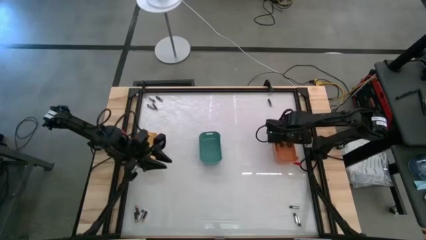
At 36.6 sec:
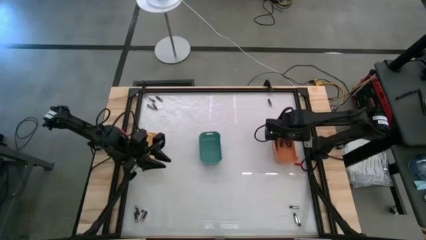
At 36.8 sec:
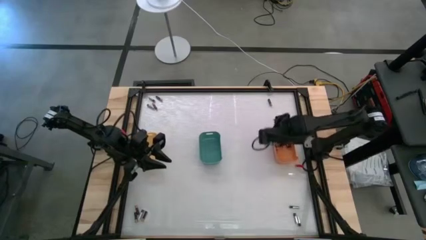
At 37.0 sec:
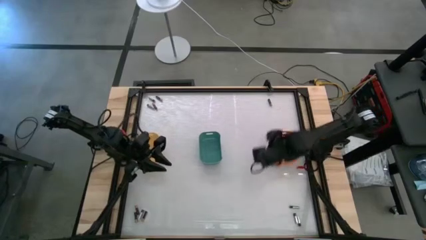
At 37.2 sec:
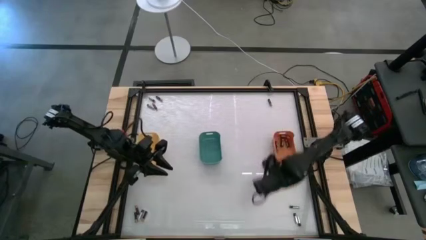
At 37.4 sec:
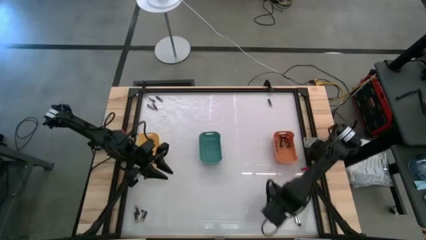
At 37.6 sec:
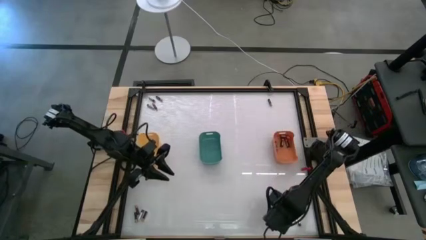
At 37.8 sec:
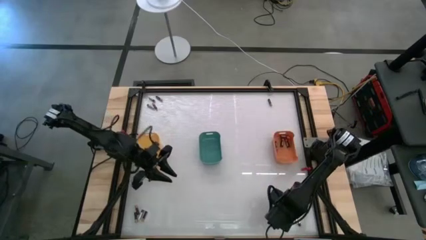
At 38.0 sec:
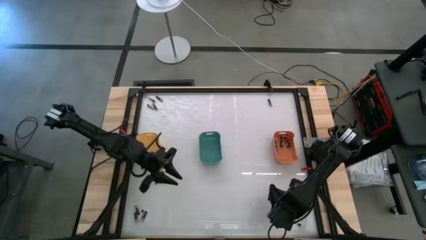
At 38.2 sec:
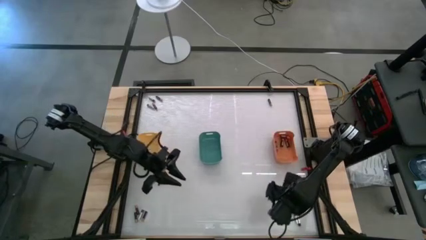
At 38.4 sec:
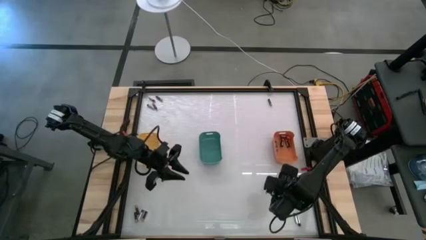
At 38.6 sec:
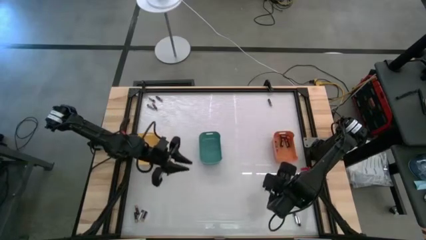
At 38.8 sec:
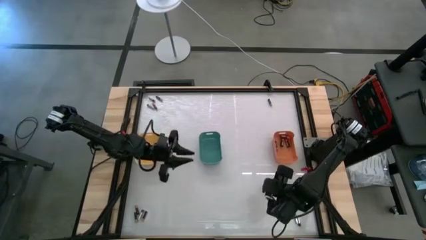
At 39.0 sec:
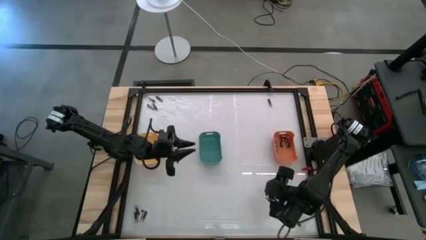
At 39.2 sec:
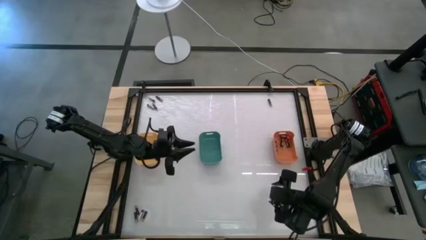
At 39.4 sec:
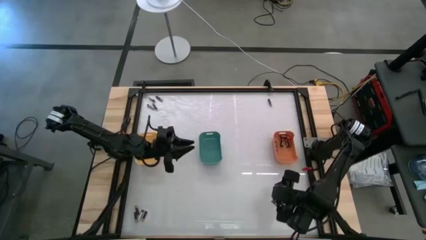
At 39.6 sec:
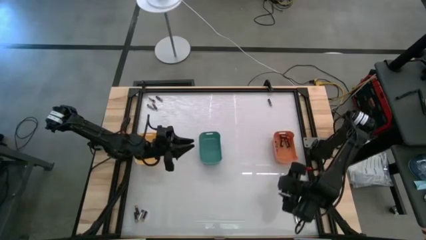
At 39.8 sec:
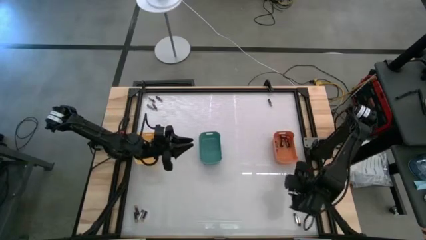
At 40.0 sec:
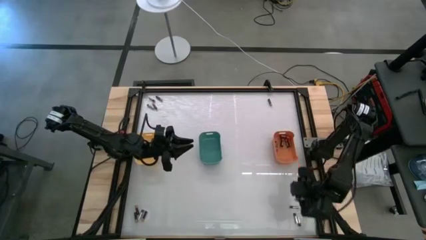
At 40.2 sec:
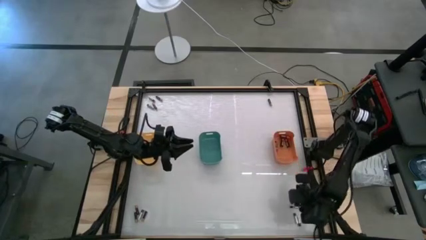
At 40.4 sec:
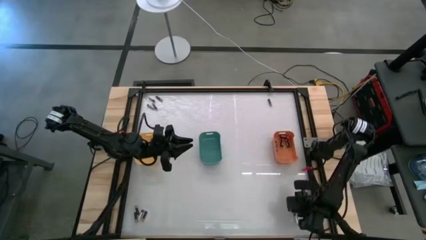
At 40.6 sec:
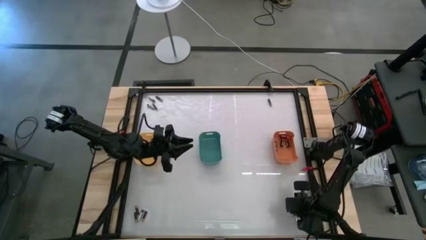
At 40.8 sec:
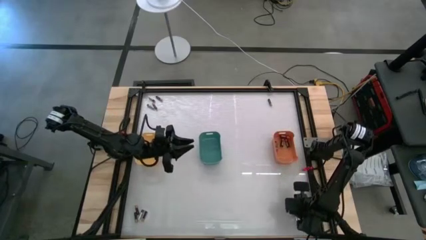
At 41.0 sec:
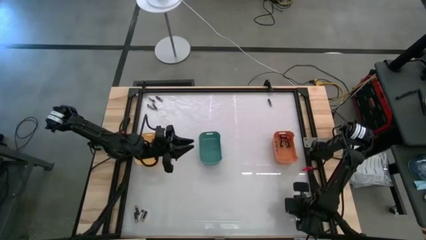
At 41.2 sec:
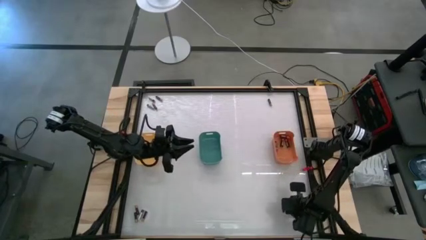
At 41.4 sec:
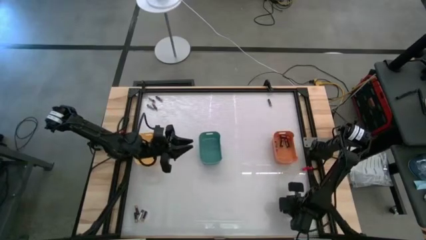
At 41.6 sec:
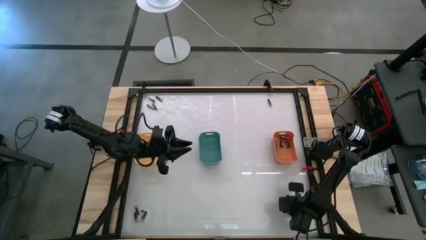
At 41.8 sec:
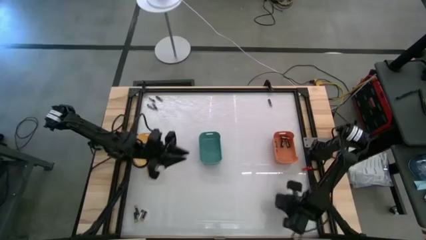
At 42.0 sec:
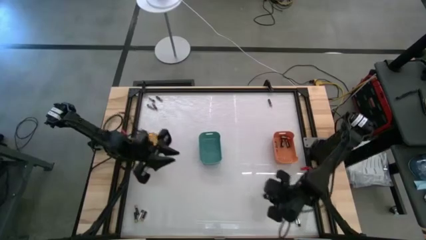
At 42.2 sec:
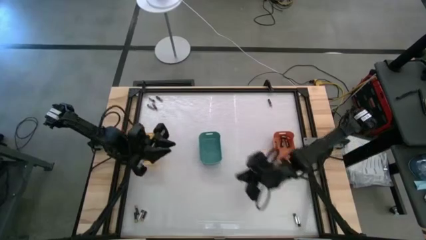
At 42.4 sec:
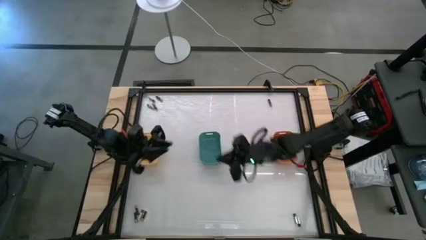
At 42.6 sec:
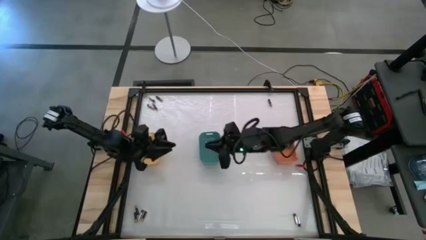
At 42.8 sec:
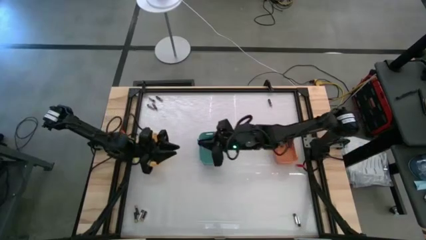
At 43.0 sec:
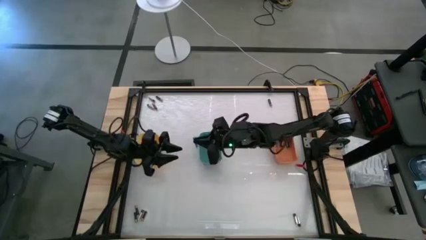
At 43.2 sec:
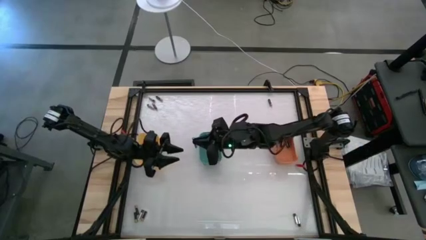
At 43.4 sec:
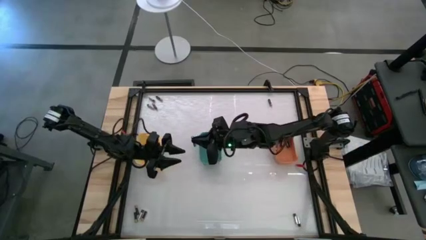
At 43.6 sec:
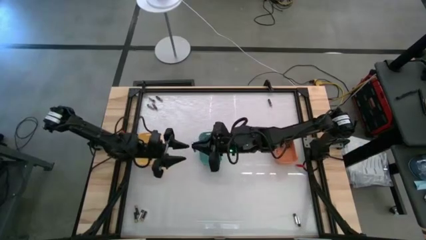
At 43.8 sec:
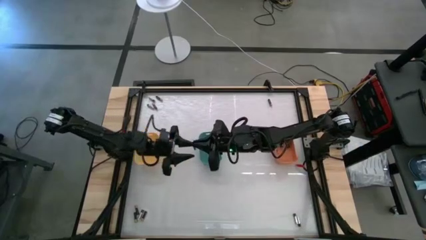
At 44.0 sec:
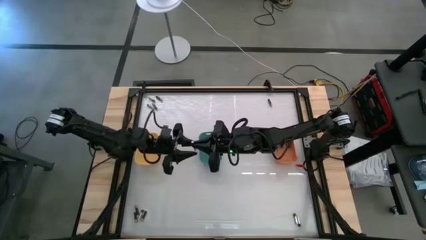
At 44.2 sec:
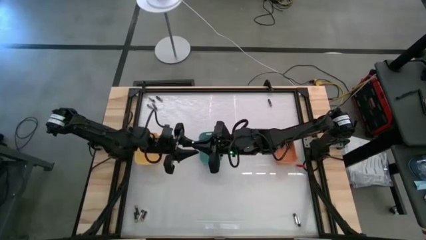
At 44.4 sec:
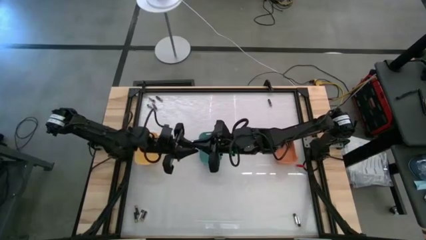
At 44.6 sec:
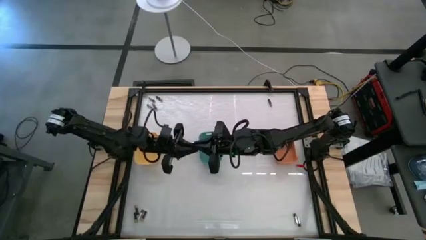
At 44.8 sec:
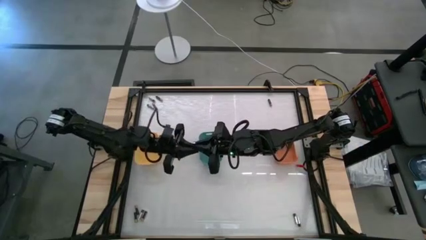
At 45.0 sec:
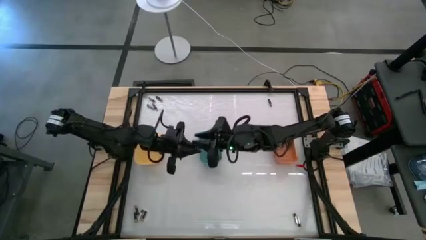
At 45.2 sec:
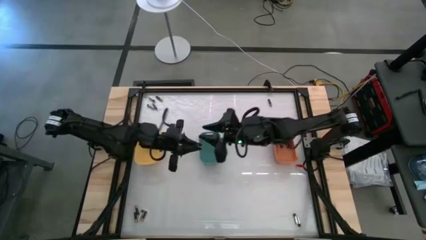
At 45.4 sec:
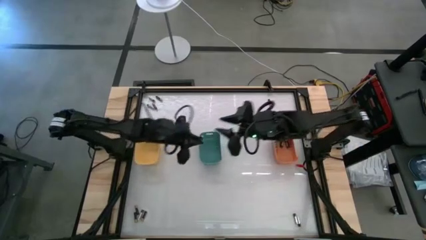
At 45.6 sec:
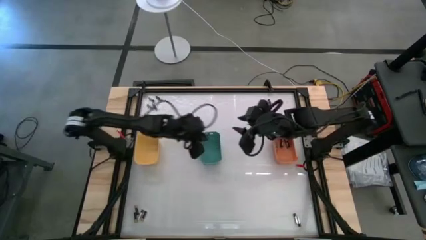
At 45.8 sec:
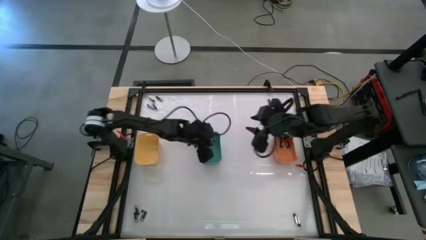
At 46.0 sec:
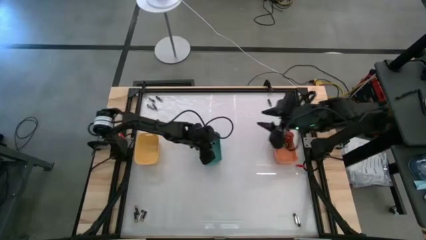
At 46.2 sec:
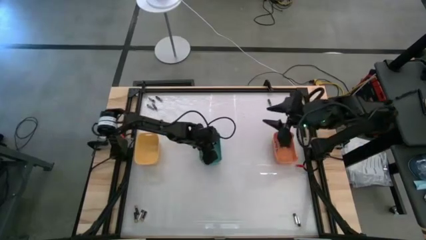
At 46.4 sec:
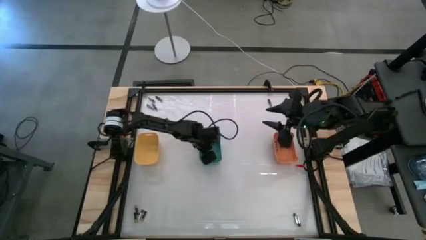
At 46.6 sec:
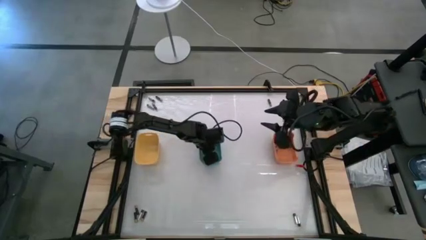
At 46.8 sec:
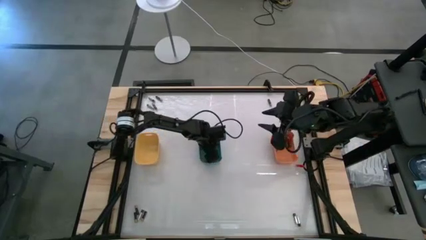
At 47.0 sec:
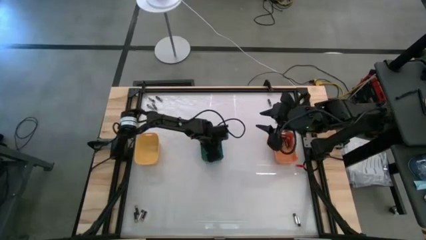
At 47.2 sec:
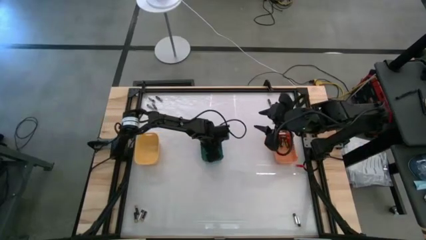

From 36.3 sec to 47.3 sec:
Task: Sort batteries
Put the silver battery into the green bin

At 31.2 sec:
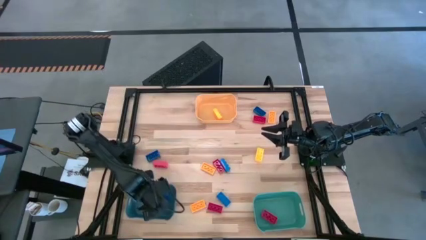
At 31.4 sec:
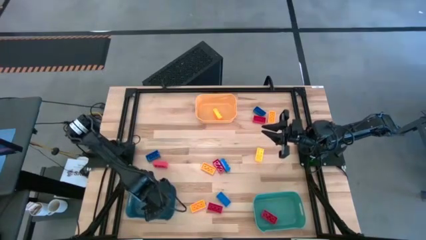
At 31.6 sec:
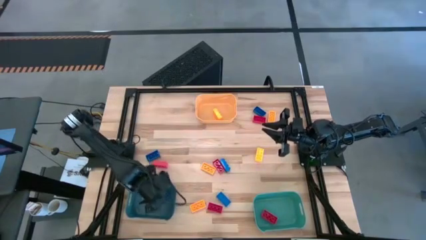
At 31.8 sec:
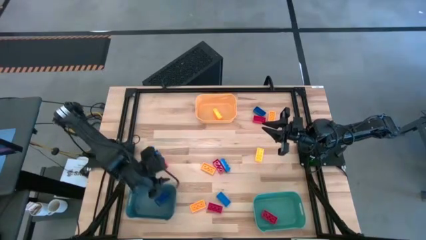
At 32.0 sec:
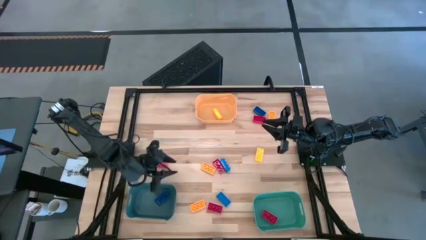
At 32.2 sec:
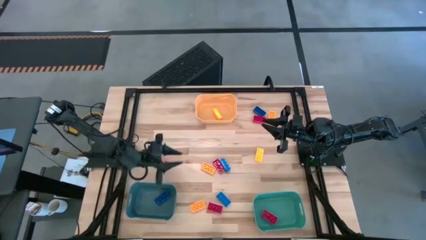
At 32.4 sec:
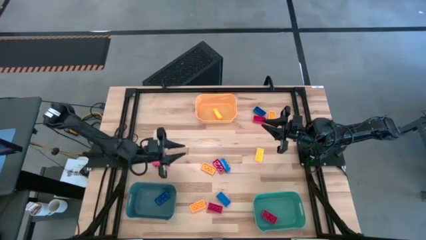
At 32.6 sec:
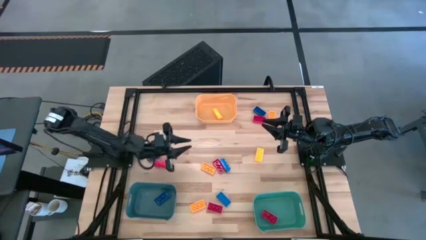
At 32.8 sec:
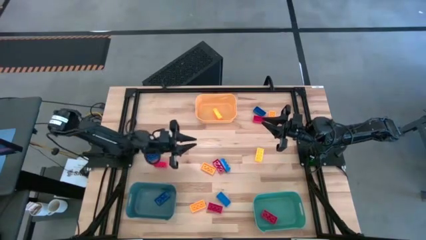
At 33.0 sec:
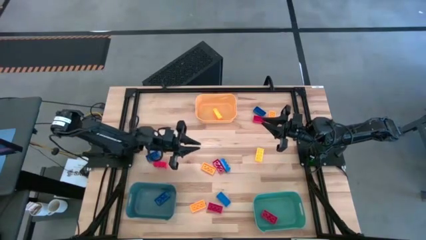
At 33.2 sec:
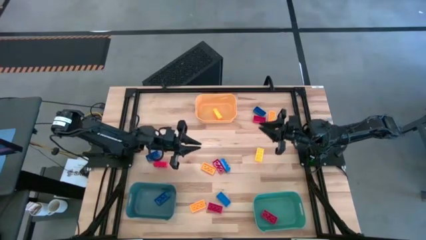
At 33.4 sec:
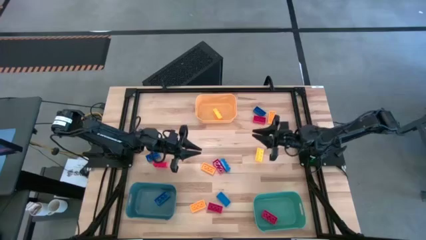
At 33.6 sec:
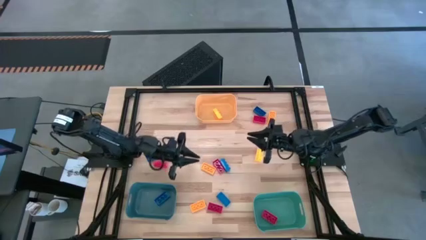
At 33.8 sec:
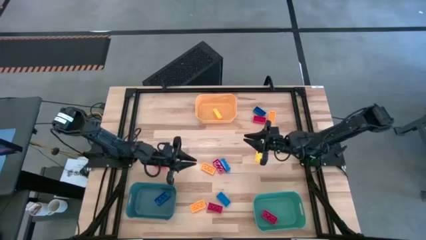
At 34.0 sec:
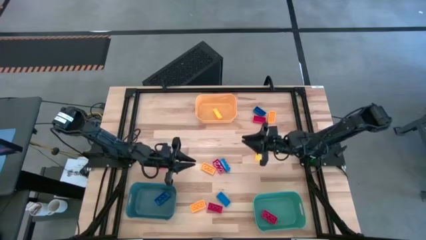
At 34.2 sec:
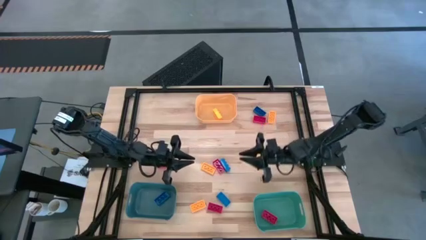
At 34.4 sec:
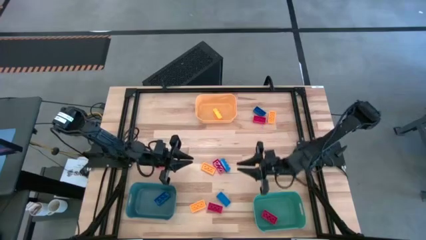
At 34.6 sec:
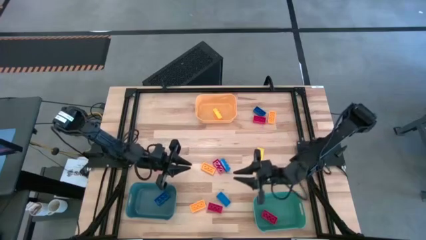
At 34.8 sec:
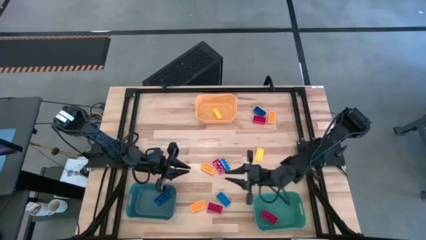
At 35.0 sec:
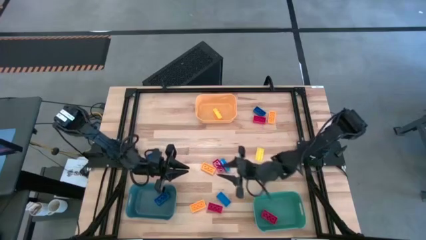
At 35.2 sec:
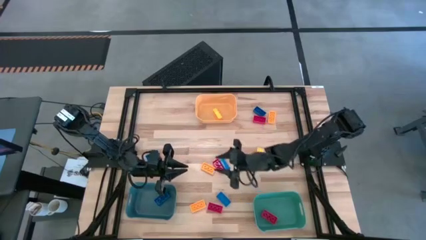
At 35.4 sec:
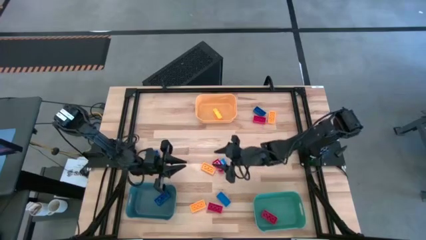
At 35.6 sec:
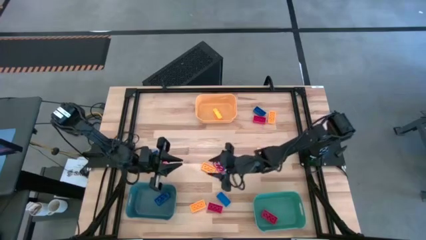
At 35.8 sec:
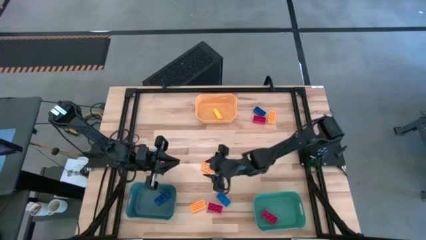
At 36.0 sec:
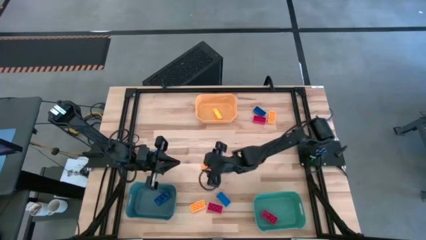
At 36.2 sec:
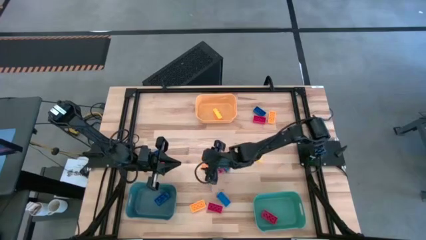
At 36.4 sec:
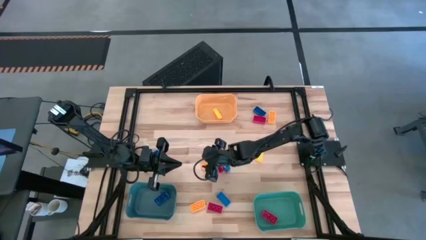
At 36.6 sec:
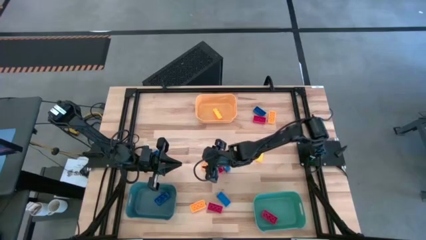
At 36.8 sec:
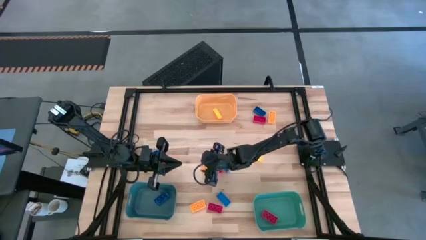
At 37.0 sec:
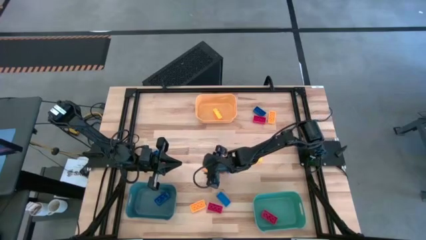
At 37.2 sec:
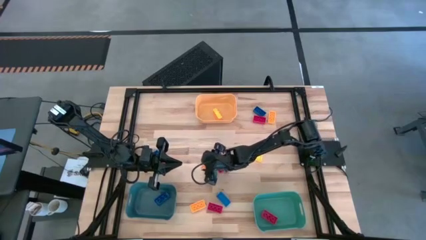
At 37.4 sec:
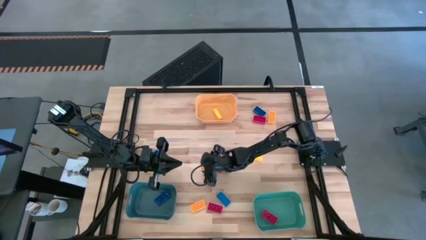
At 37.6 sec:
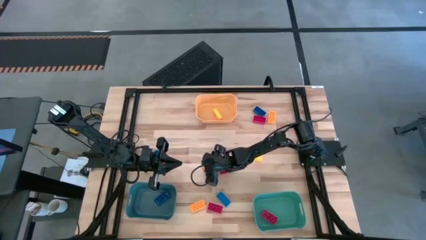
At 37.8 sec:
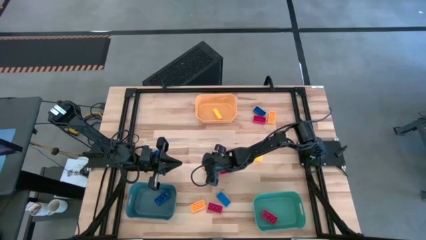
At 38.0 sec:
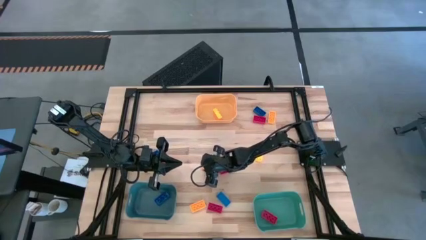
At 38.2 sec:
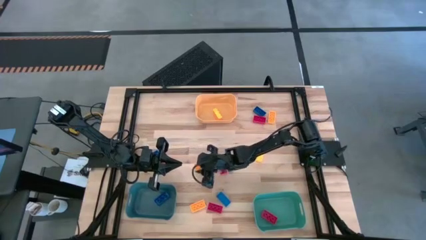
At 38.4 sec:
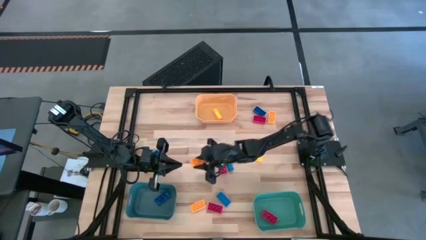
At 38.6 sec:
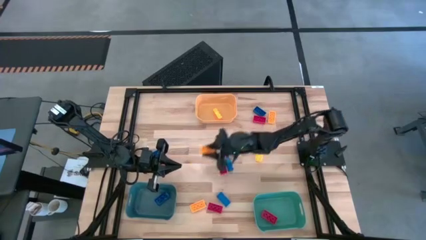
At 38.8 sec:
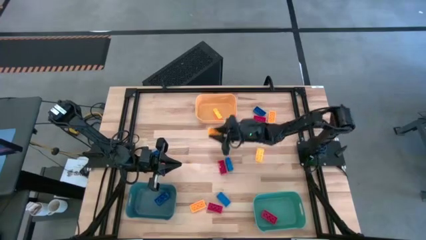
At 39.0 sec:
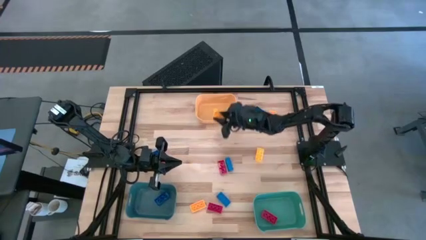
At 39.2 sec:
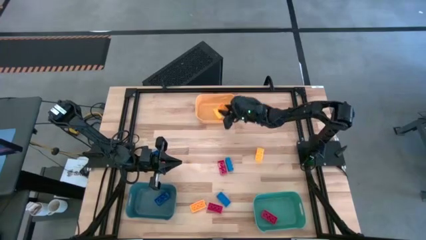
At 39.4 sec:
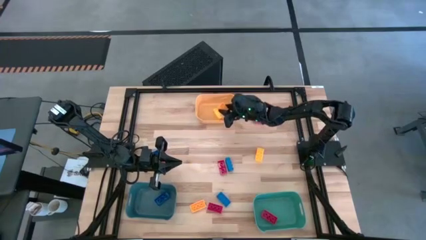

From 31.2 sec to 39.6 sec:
Task: Sort & place blocks by color
Put the yellow game piece into the yellow bin
